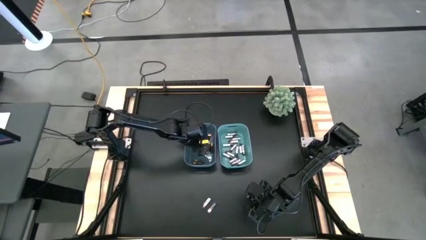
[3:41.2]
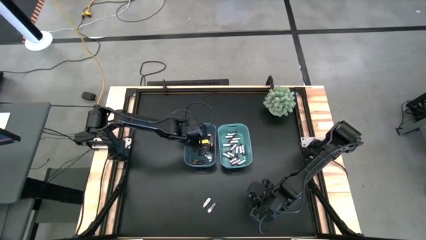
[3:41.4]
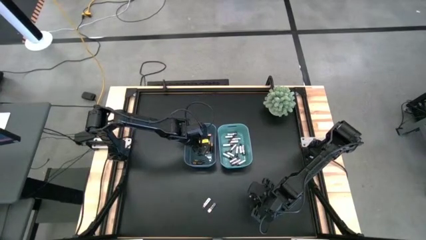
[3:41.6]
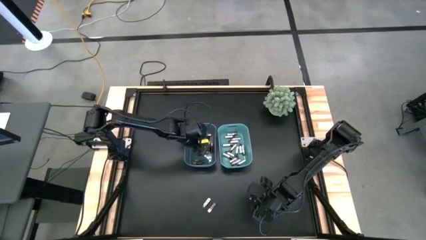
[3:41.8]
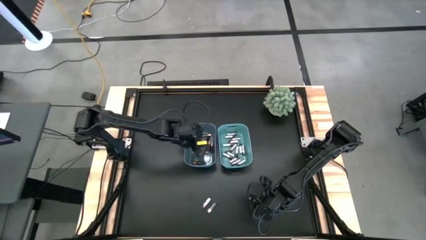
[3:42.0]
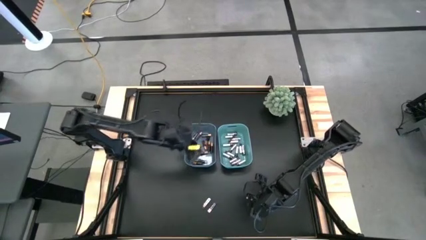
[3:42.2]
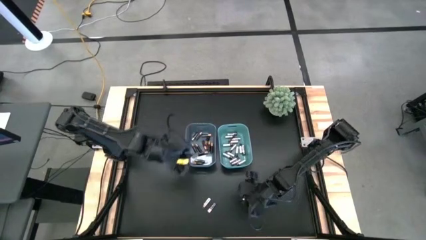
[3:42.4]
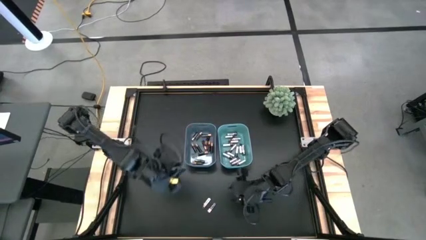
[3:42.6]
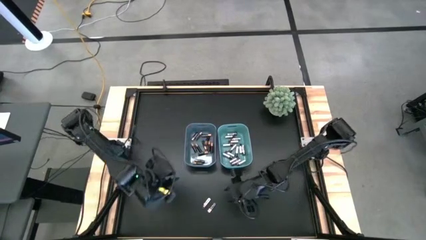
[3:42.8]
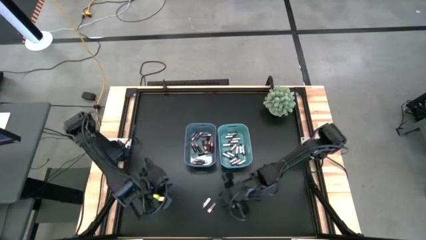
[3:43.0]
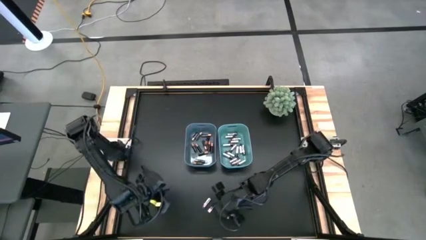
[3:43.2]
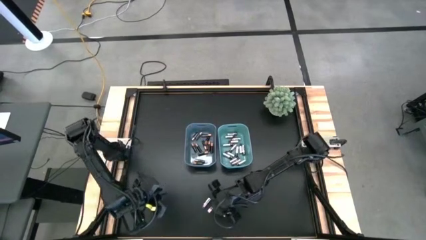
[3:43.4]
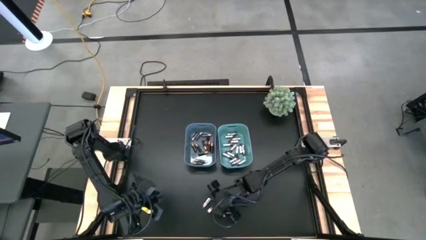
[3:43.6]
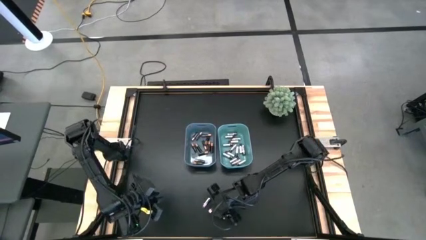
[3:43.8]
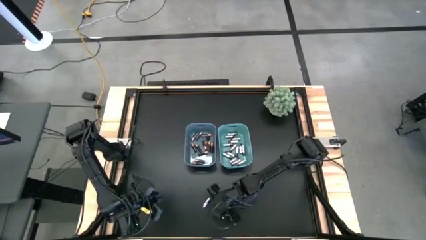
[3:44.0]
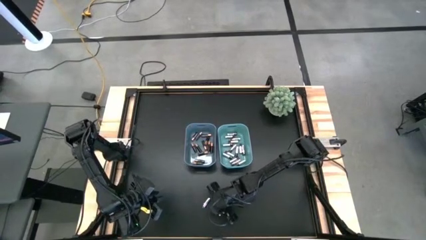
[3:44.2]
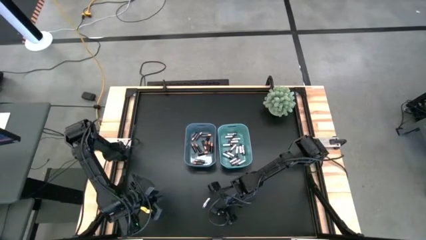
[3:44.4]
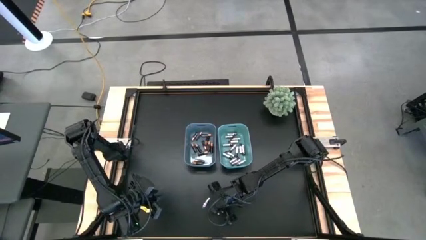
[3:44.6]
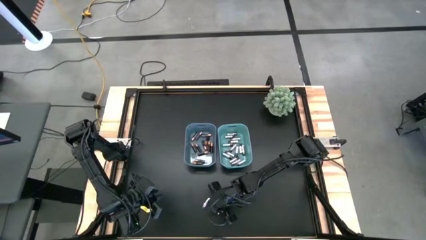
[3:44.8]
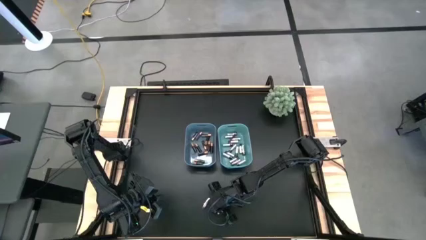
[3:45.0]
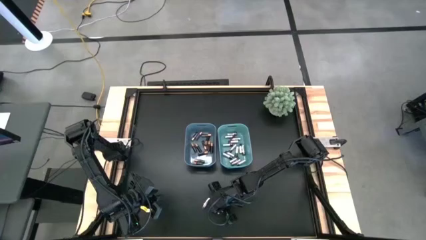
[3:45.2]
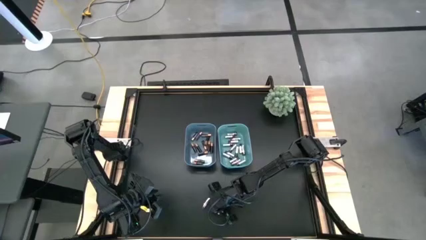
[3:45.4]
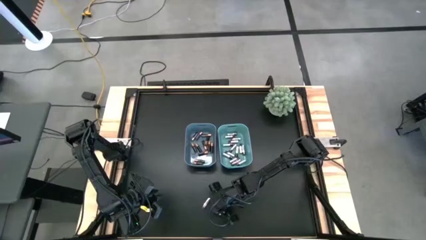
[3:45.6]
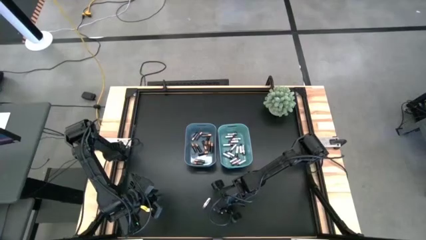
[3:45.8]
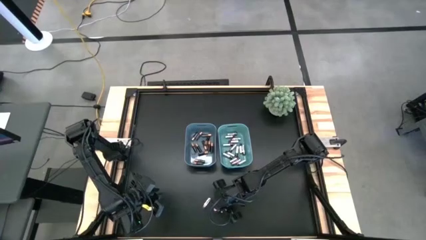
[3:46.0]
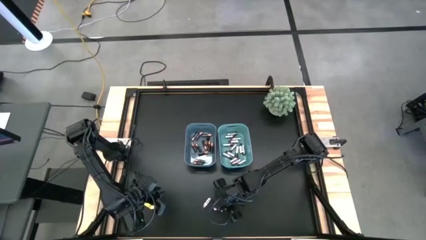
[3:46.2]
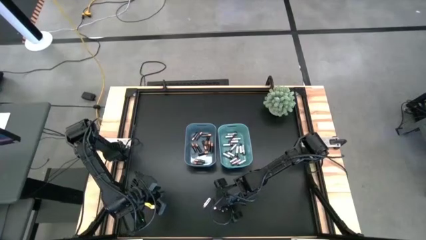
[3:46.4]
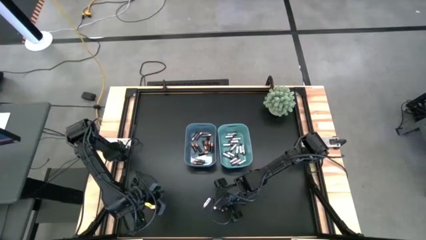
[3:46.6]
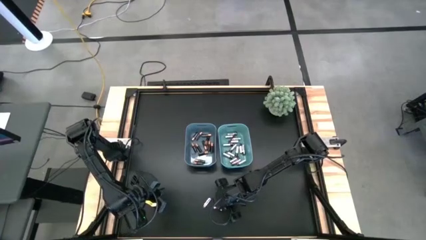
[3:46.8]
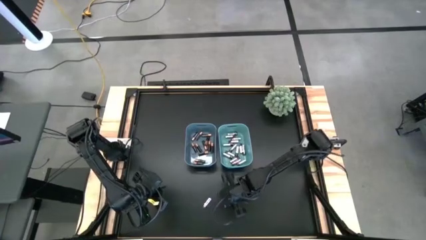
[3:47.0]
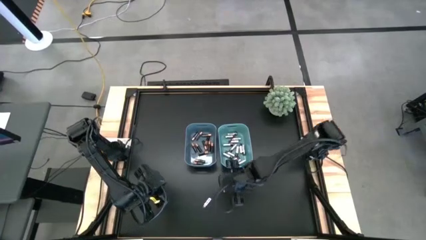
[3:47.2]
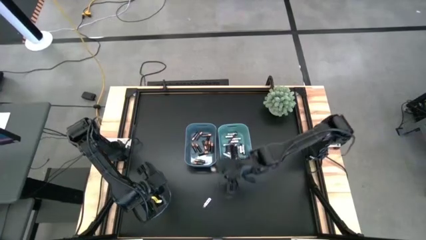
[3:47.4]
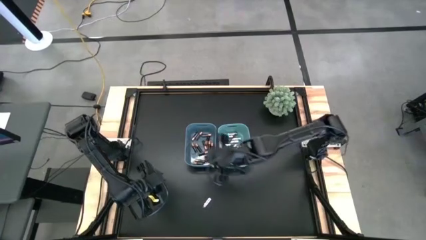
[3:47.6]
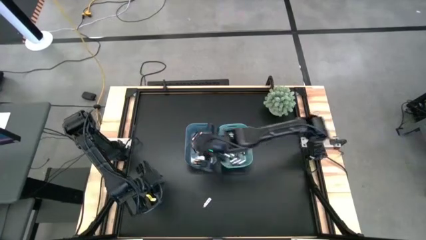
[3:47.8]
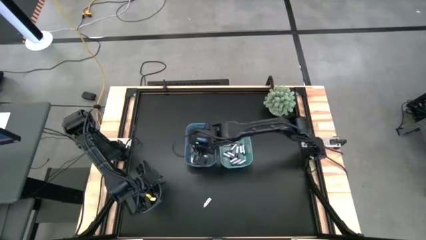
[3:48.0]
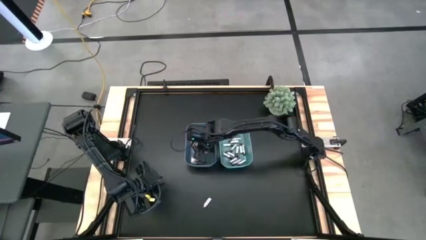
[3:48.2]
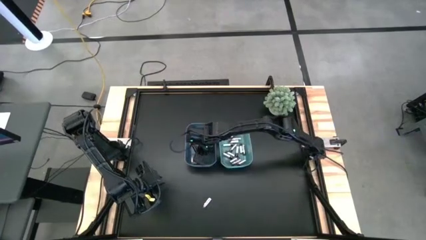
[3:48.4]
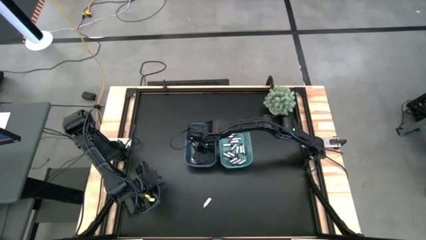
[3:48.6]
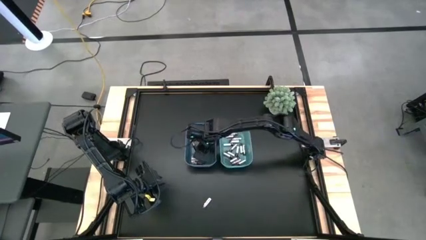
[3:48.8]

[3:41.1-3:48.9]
Task: Sort batteries
Put the black battery into the blue bin

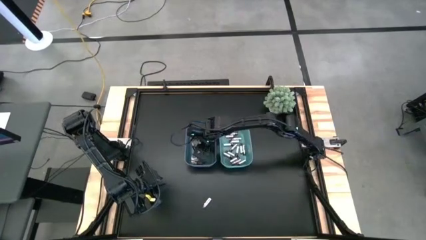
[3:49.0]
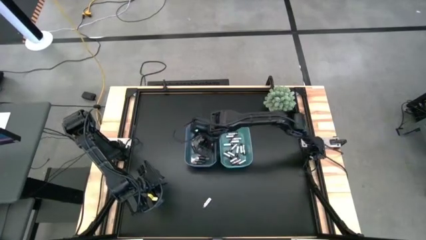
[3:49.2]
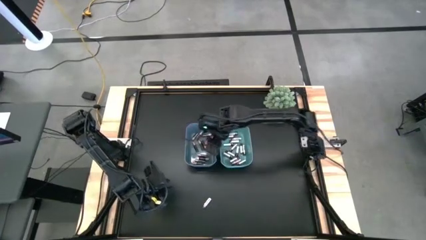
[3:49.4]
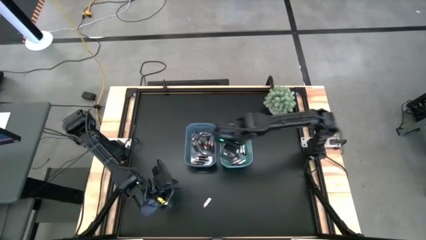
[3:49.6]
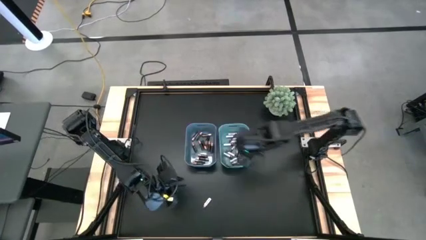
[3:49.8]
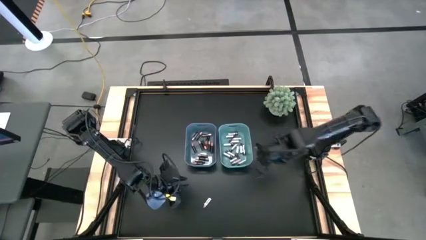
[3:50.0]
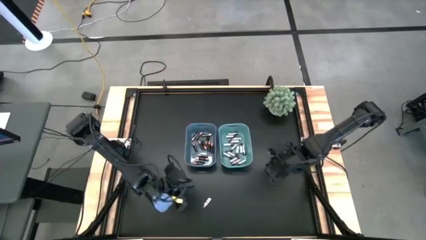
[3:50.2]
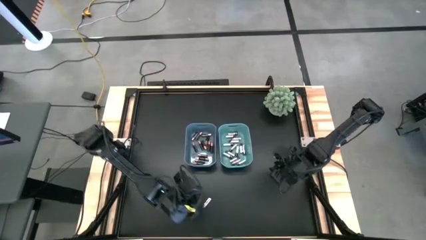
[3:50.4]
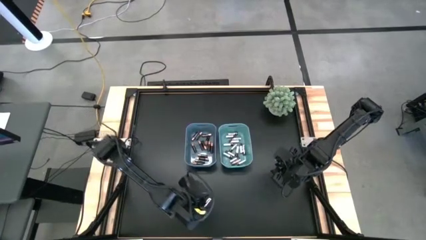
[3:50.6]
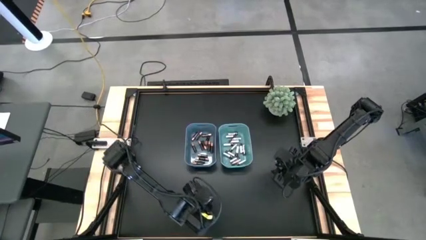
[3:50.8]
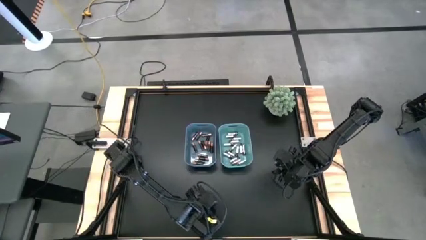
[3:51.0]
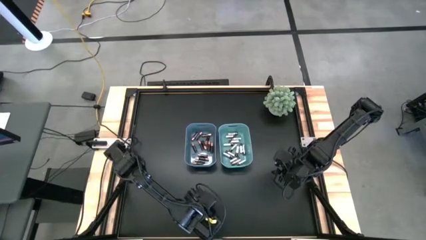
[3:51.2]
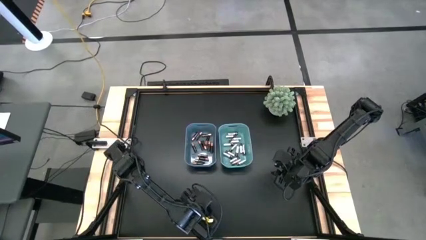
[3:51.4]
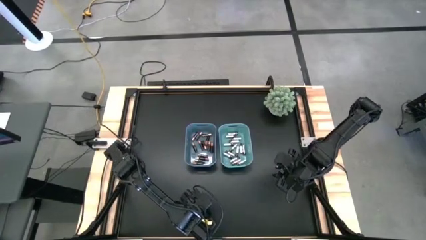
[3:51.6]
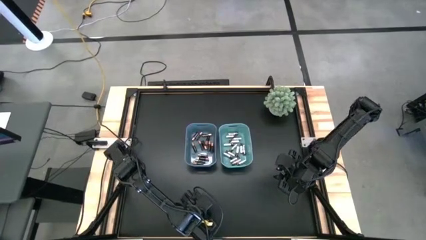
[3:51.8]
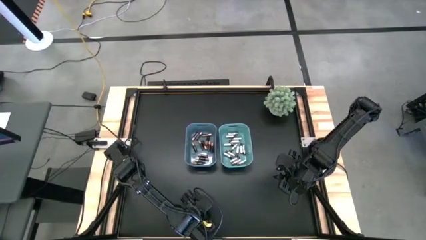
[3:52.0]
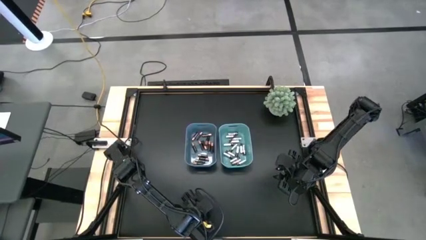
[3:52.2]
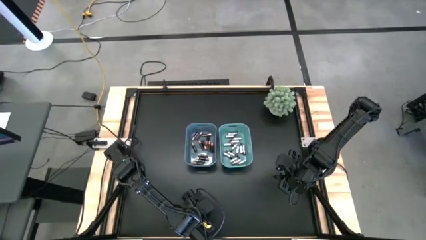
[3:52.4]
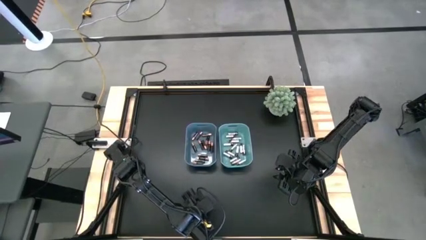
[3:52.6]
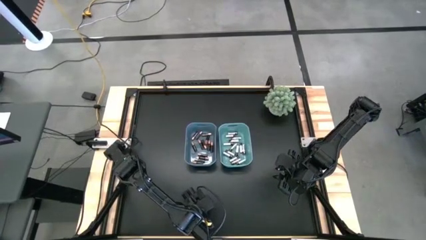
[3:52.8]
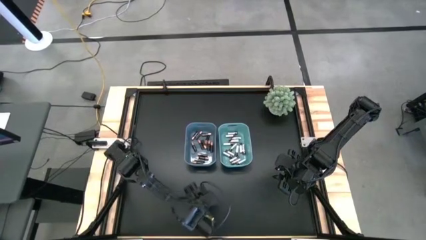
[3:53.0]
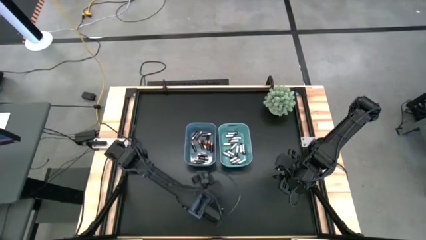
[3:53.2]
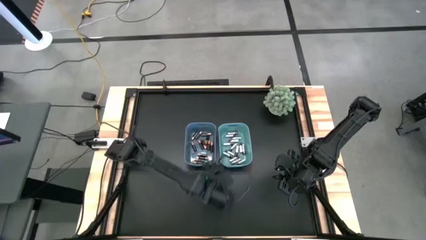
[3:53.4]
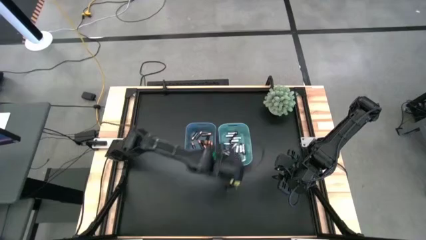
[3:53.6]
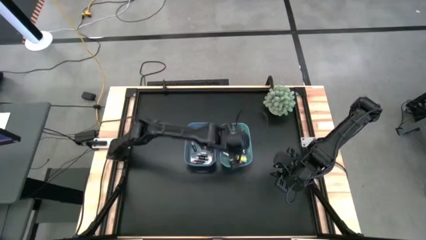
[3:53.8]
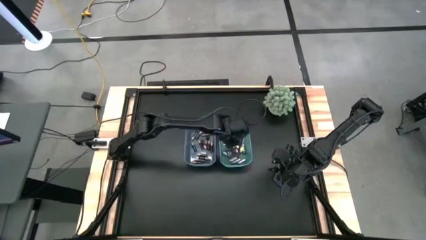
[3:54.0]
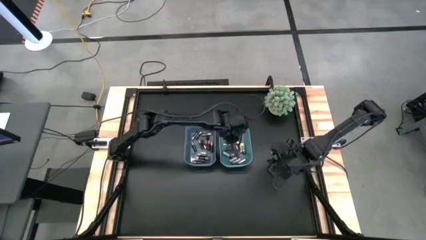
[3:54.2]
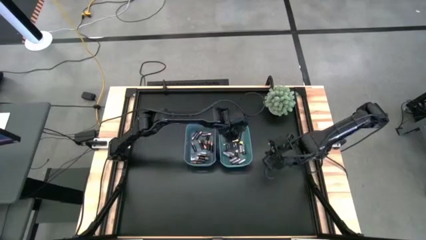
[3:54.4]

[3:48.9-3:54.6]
Put the white battery into the green bin

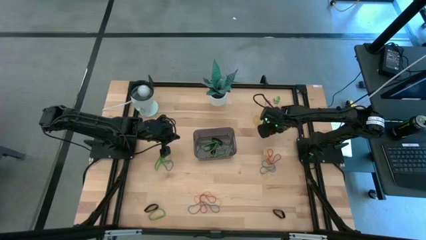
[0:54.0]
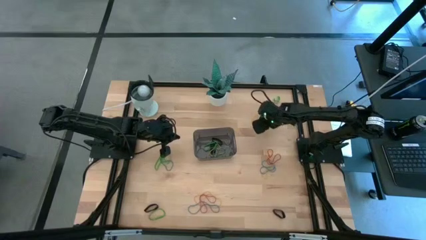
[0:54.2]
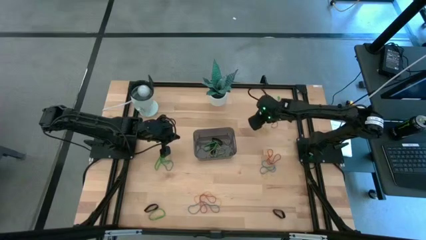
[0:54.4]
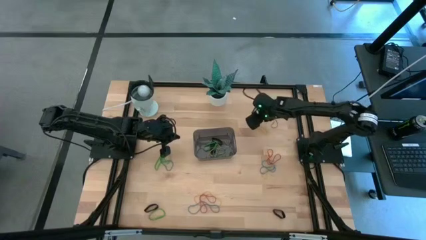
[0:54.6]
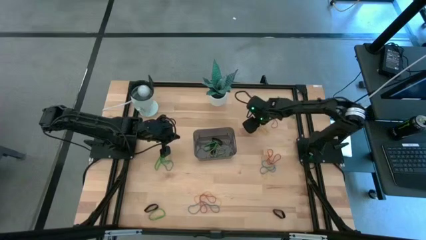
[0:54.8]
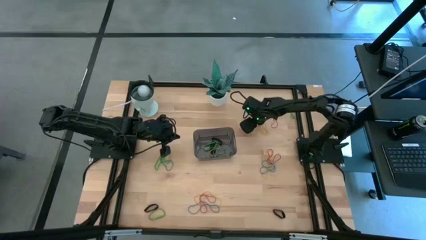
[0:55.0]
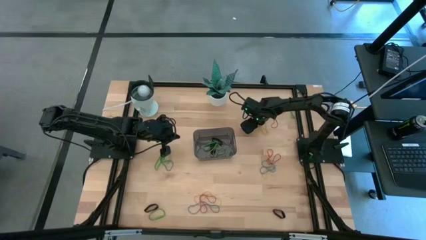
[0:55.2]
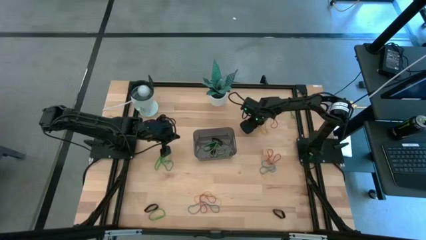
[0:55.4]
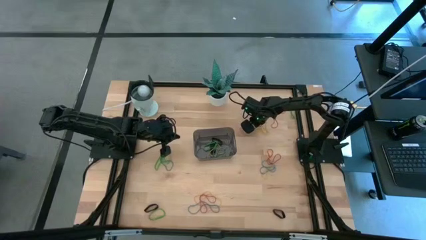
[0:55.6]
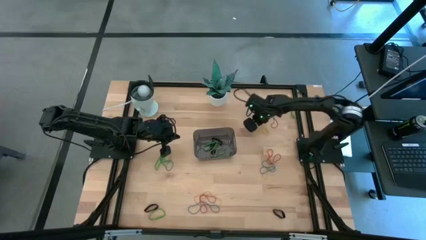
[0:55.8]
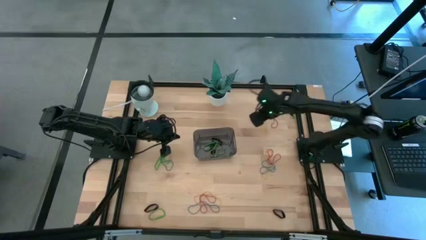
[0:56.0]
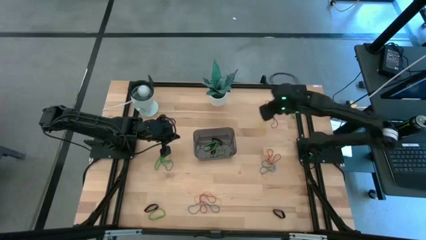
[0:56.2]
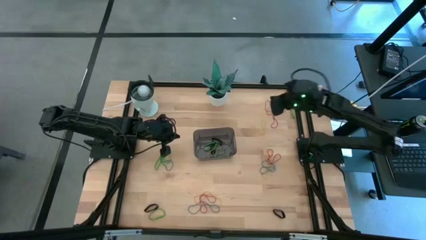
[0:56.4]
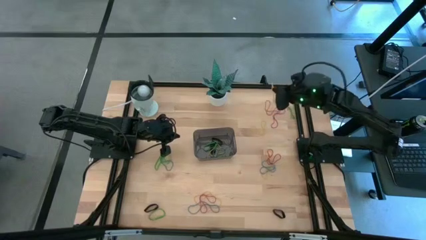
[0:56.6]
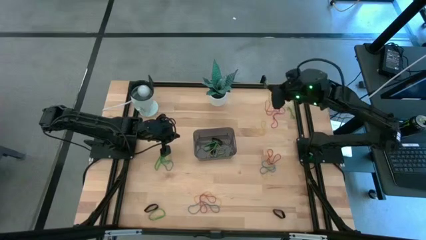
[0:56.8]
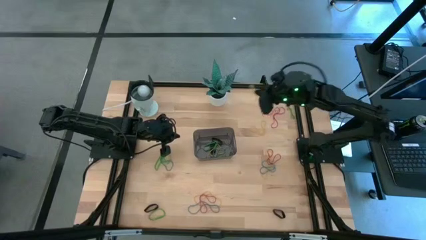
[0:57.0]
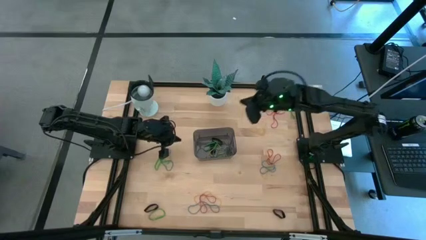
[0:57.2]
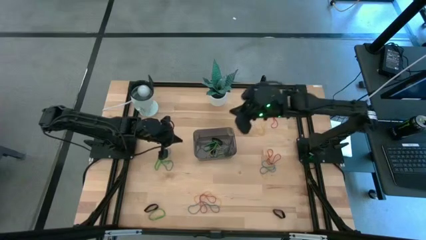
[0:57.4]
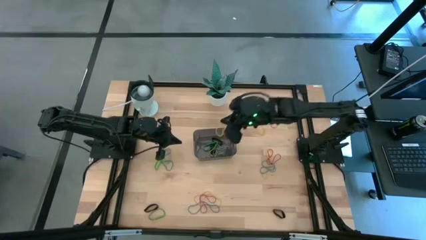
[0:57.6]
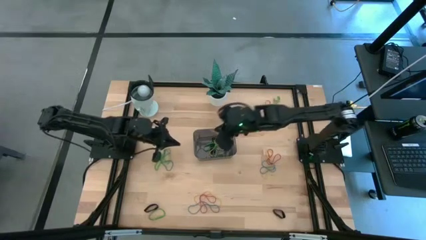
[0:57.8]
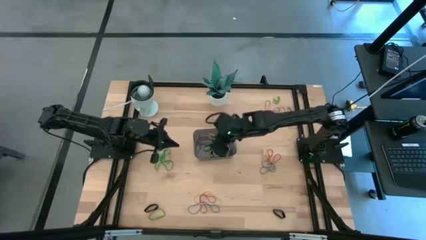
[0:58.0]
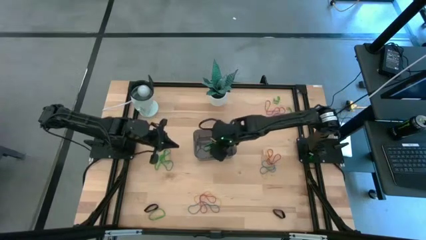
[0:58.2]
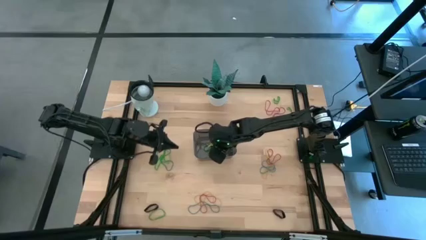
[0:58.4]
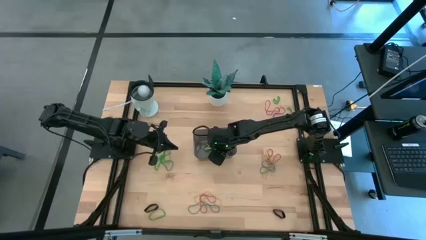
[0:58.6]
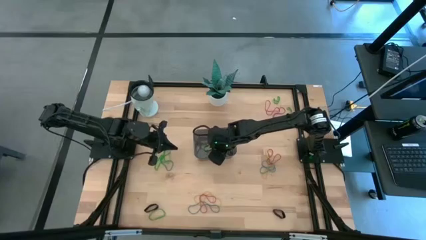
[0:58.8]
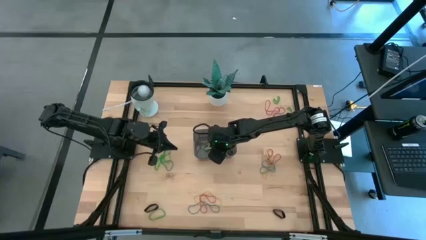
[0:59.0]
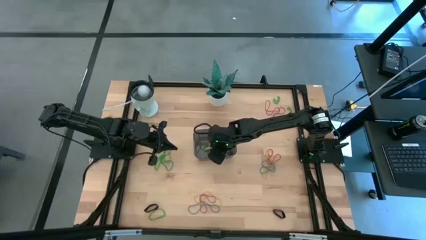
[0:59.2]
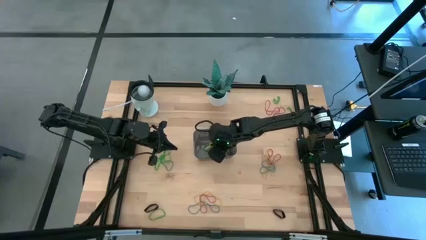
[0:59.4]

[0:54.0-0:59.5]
Task: Pick and place rubber bands into bin
Put the yellow rubber band into the black bin
